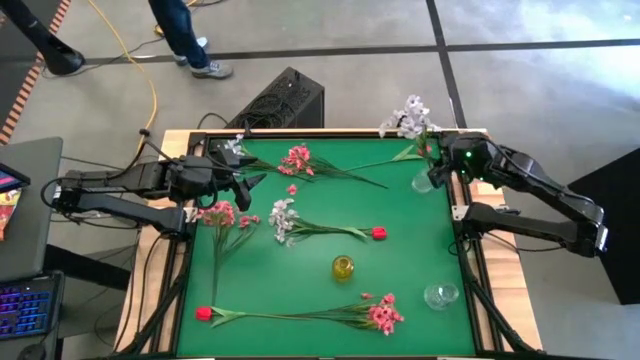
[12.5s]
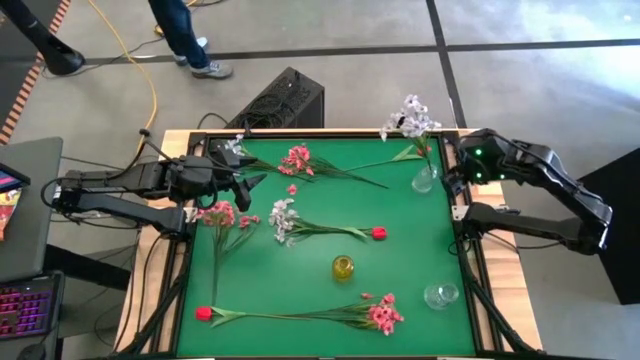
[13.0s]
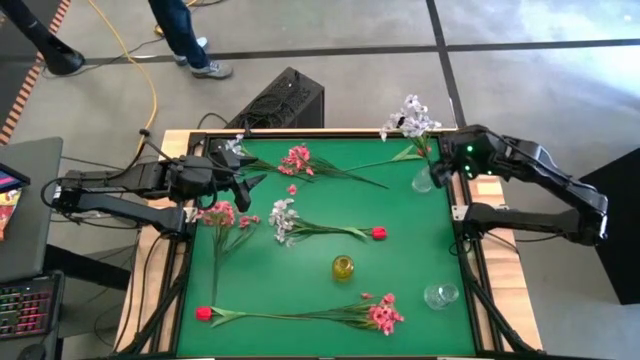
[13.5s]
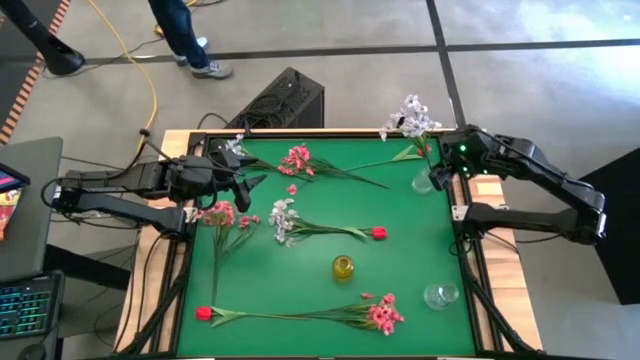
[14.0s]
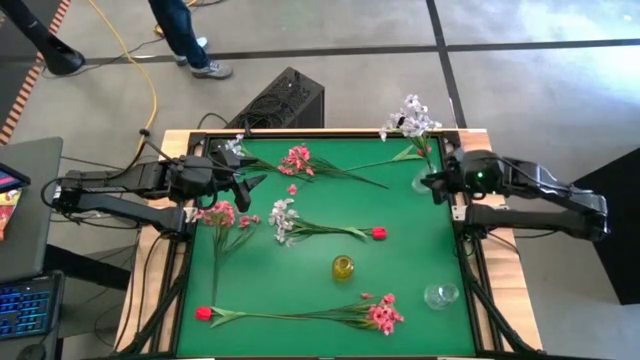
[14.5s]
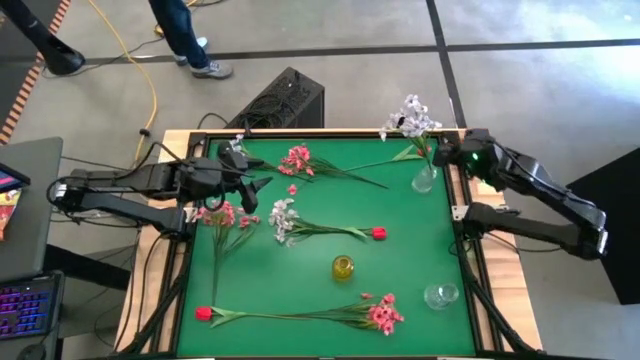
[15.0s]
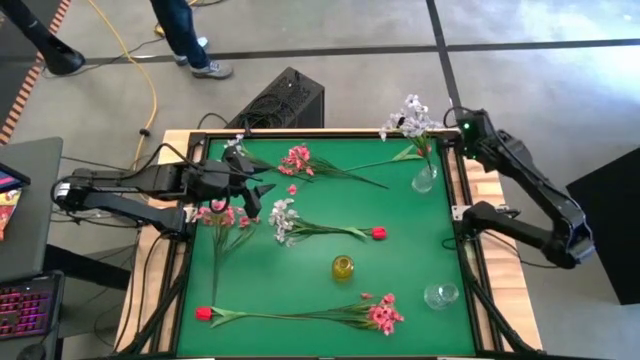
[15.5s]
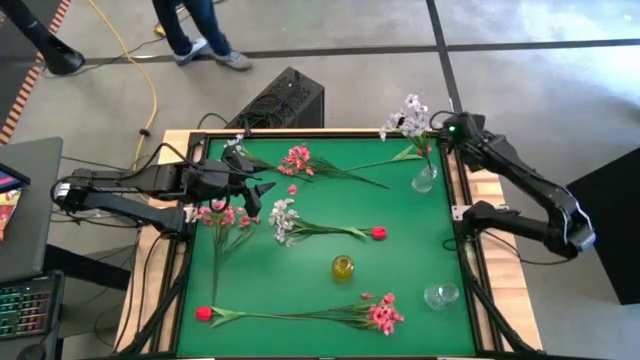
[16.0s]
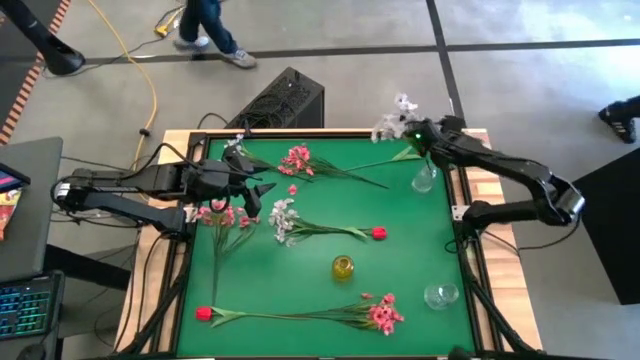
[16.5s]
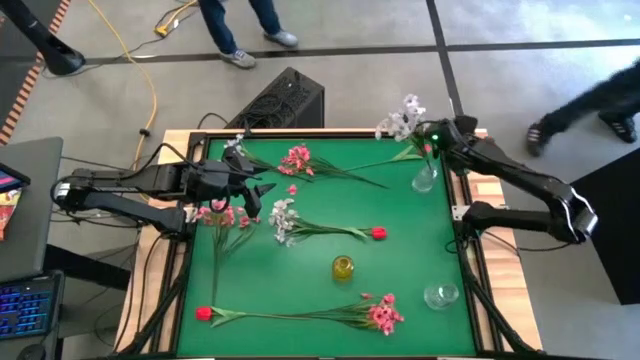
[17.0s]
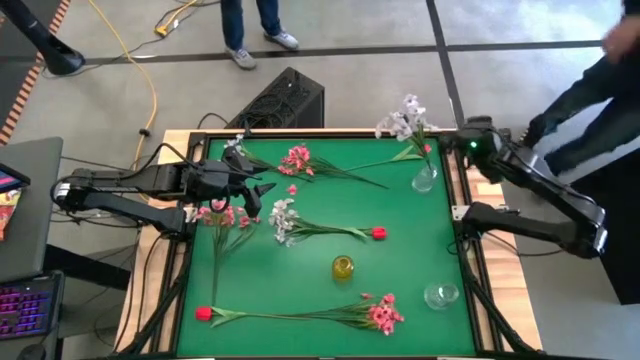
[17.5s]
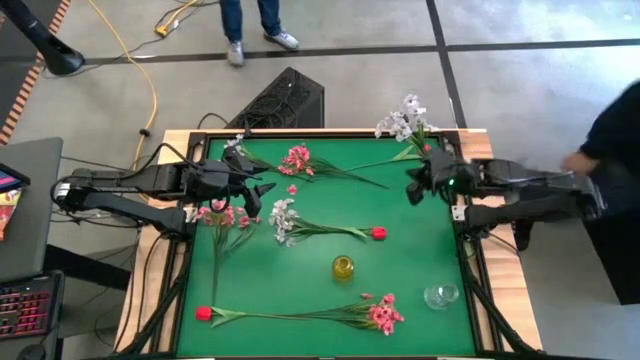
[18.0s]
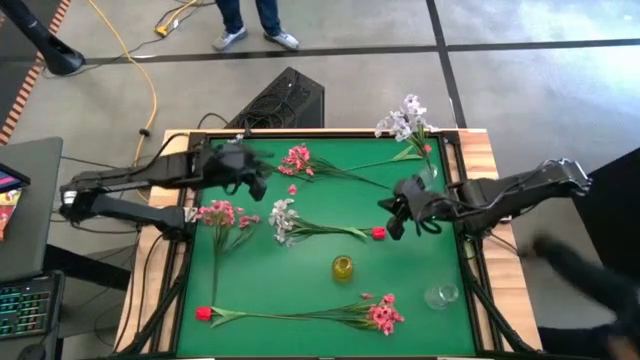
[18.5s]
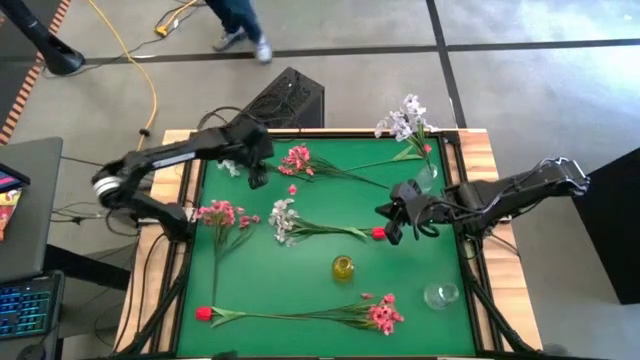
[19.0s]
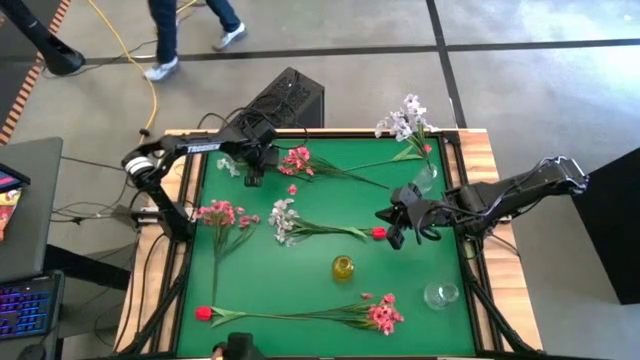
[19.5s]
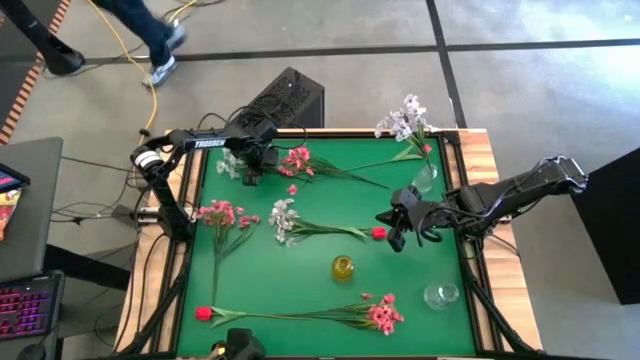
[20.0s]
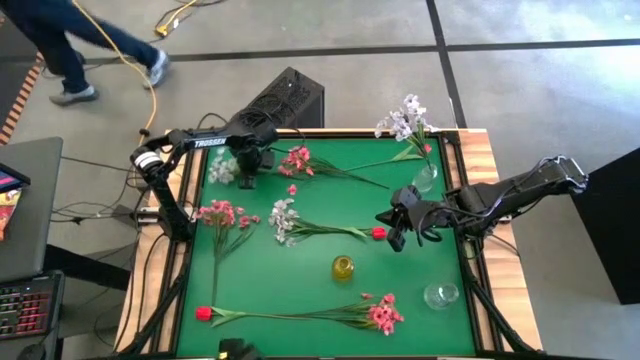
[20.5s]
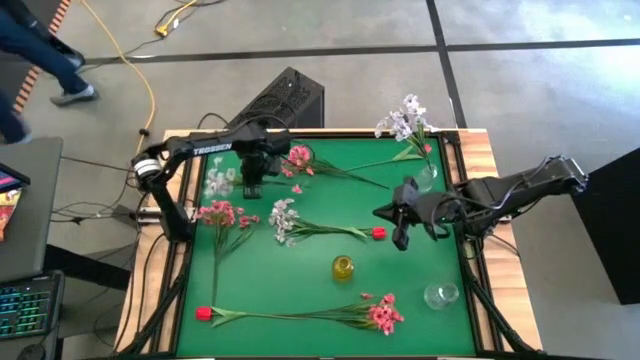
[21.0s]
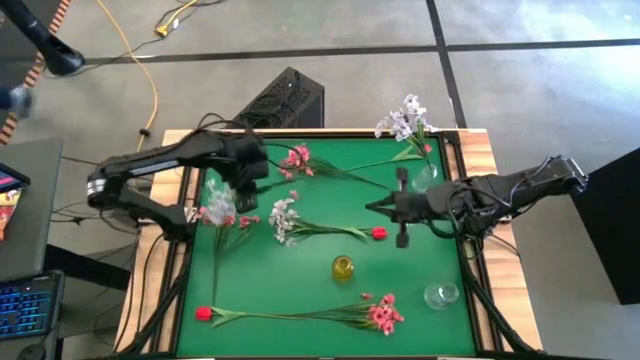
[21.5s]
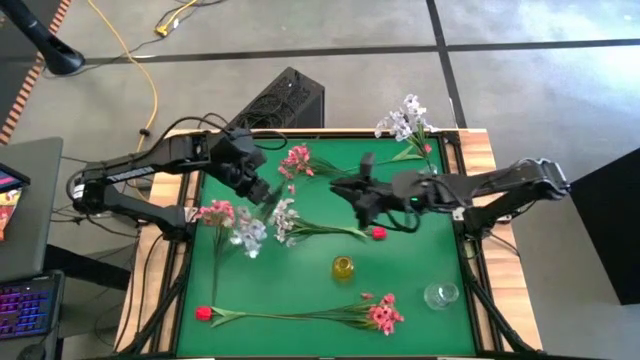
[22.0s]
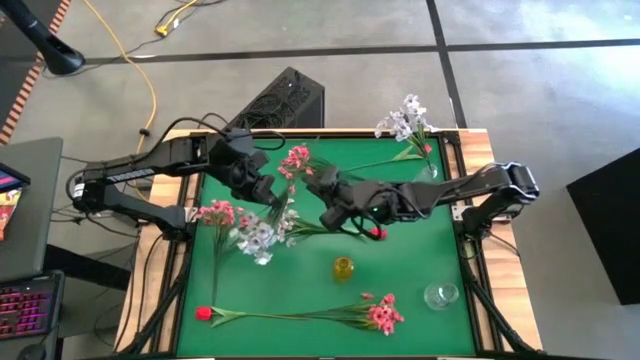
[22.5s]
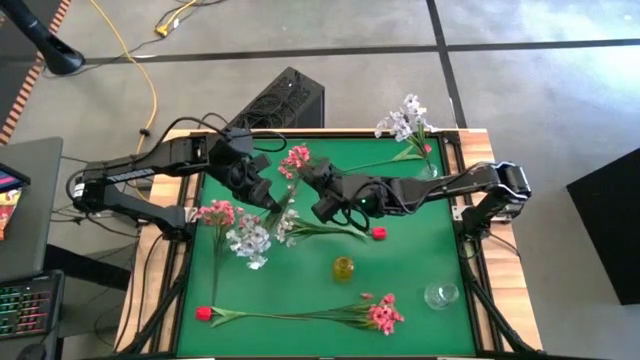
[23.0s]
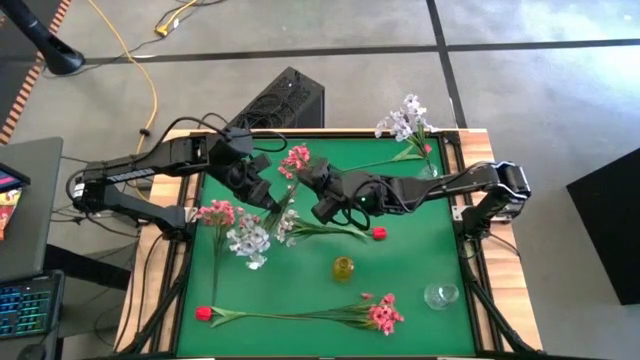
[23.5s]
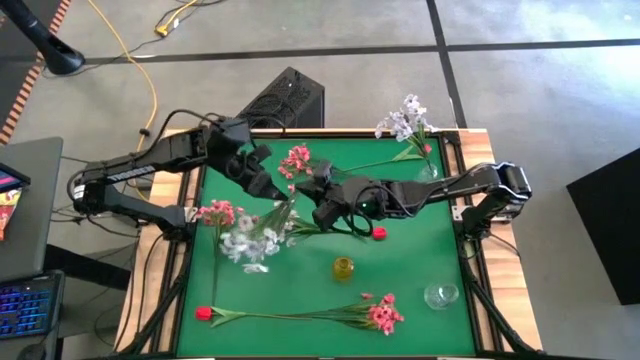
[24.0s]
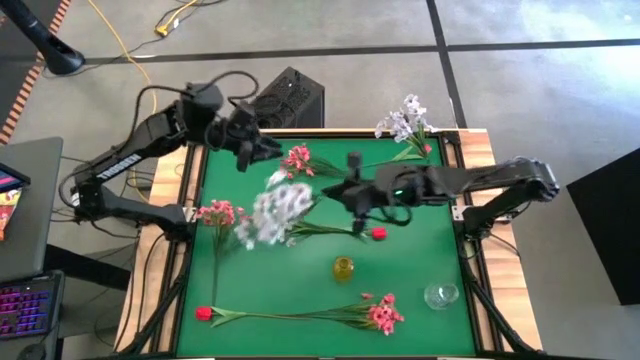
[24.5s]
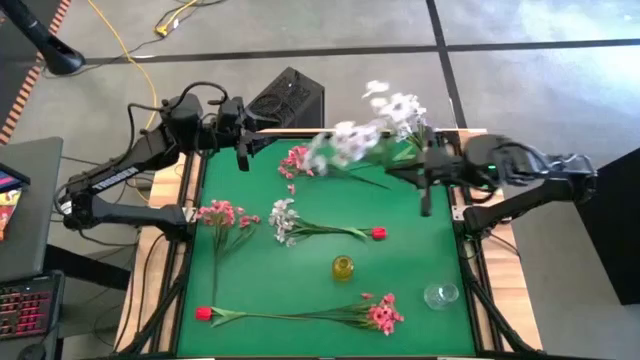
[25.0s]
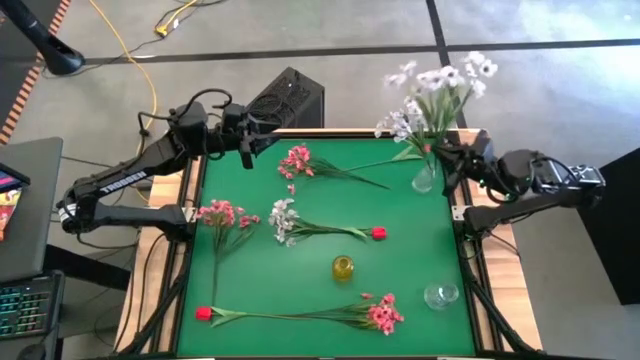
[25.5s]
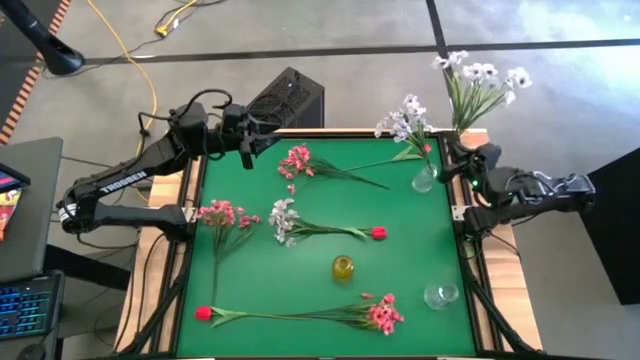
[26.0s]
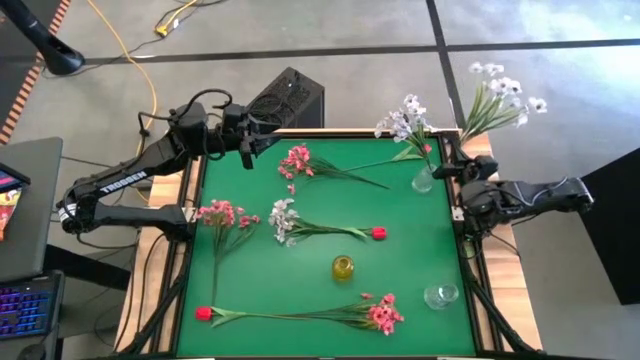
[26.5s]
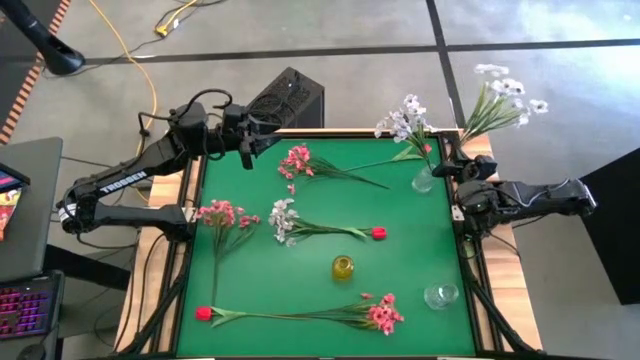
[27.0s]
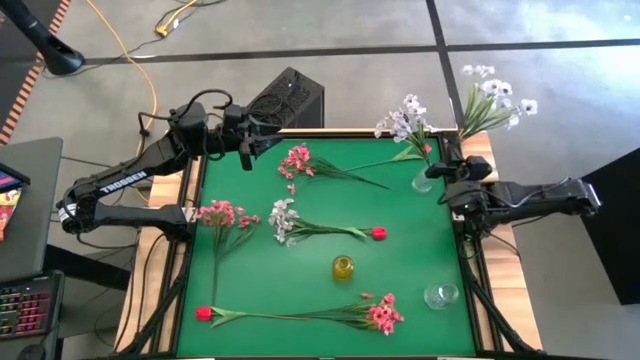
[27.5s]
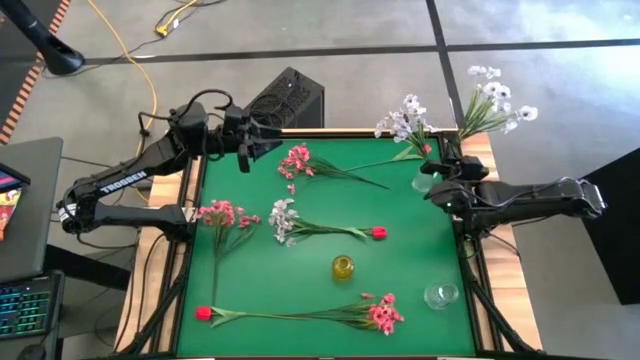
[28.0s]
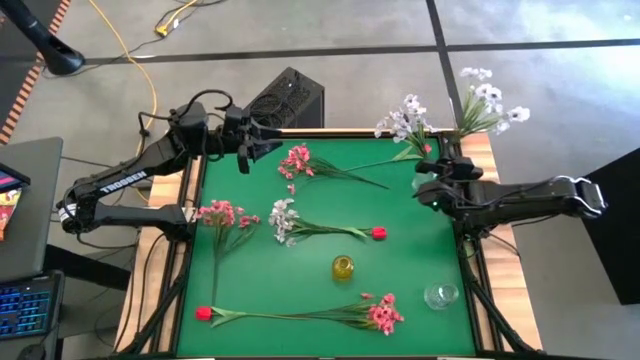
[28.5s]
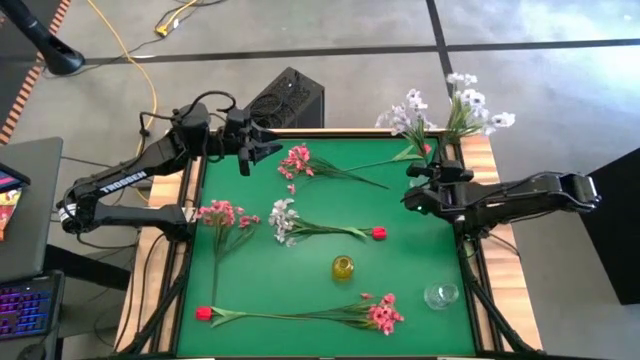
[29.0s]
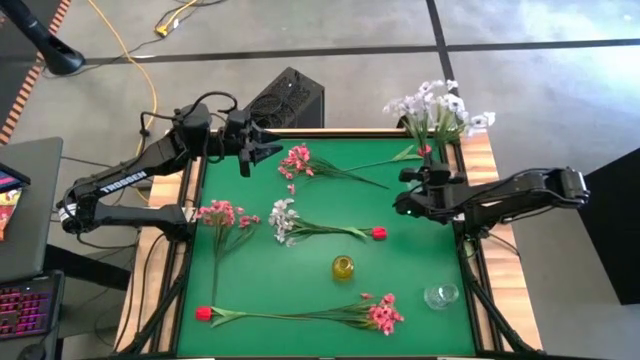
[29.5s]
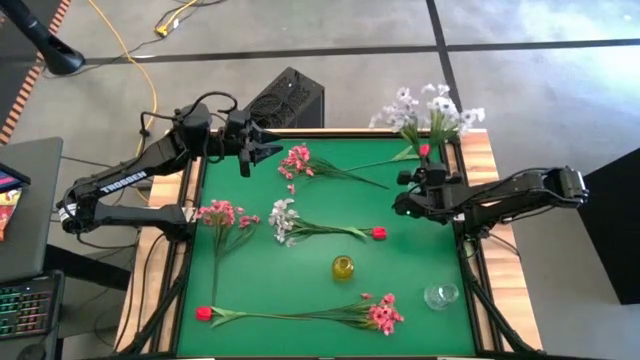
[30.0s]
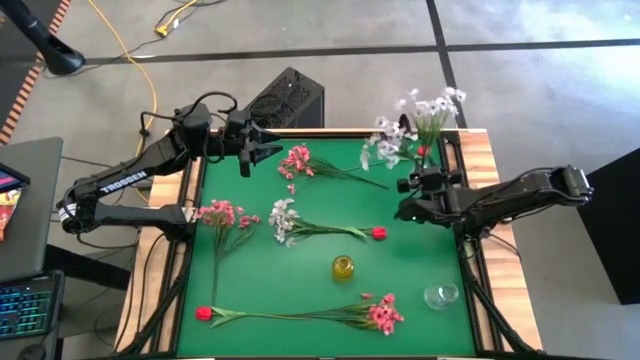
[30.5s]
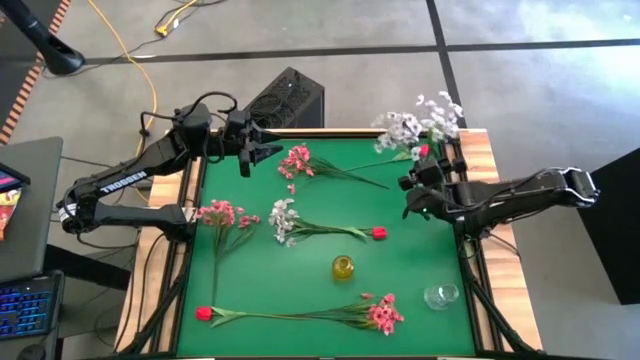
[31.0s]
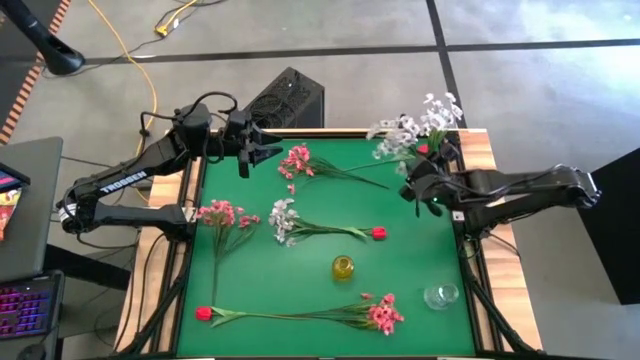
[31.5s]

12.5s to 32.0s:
Task: Sort flowers into vase by color
Put the top left white flowers into the top transparent vase

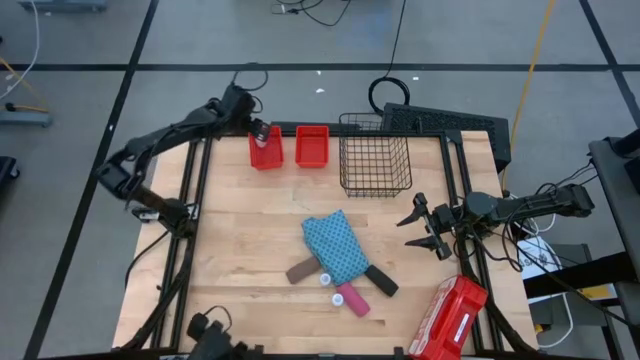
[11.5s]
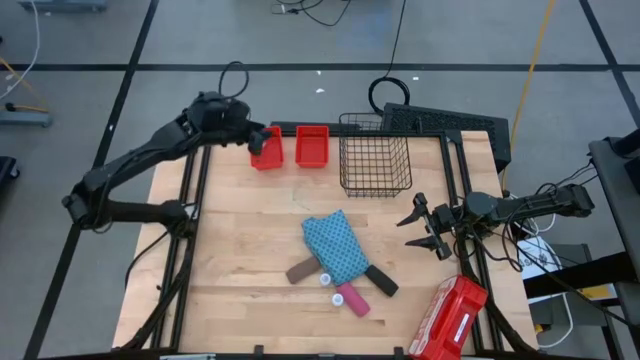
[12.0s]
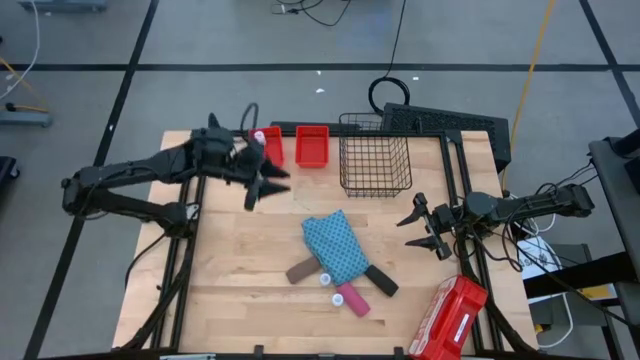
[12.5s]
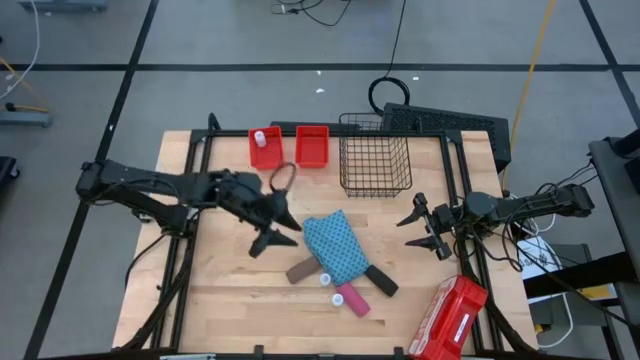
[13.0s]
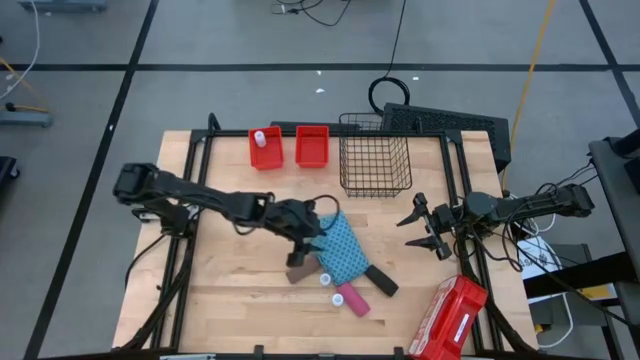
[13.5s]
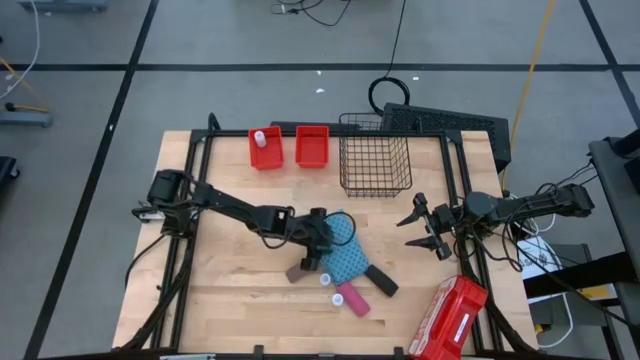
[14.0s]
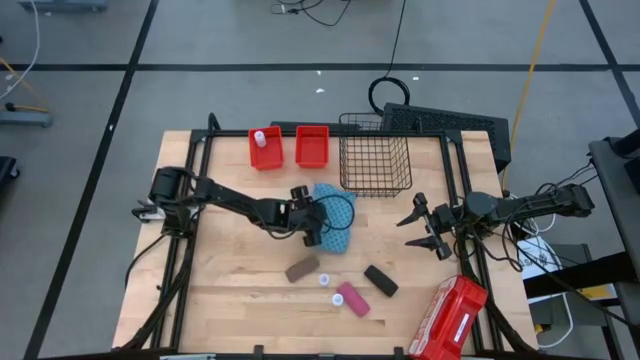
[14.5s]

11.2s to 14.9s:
Task: Pick & Place Medicine items
Adjust the blue patient gown on the table
